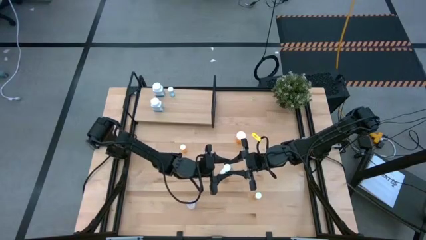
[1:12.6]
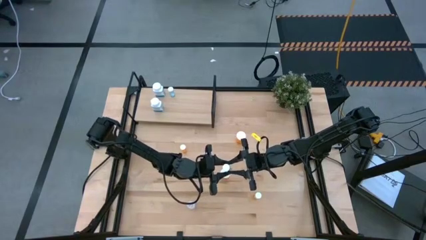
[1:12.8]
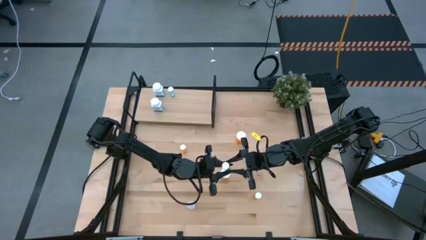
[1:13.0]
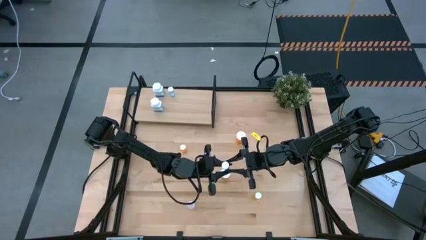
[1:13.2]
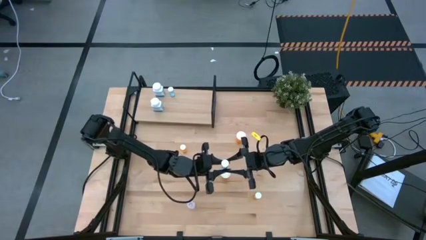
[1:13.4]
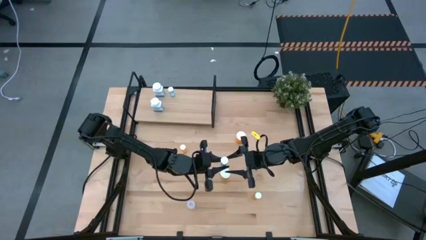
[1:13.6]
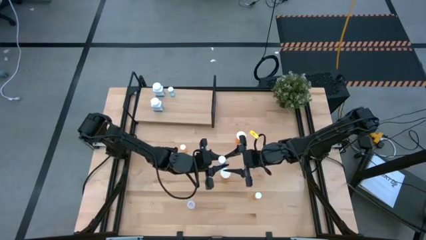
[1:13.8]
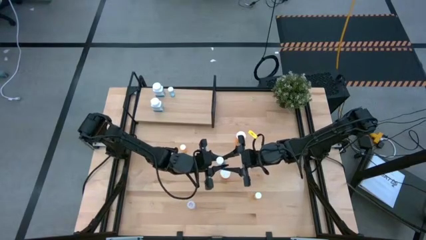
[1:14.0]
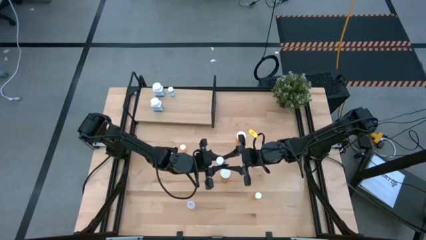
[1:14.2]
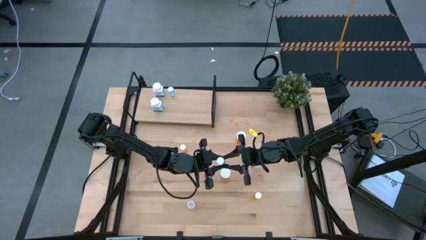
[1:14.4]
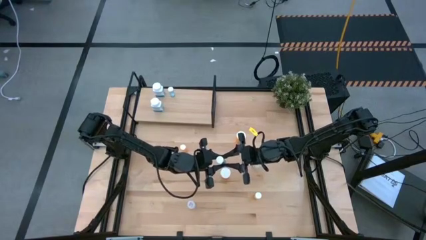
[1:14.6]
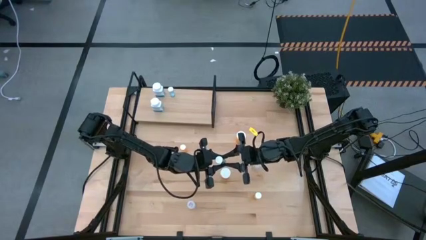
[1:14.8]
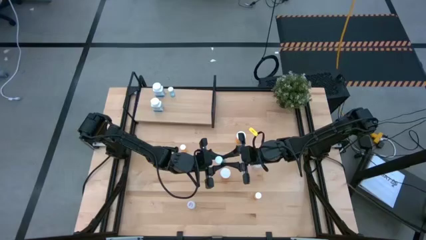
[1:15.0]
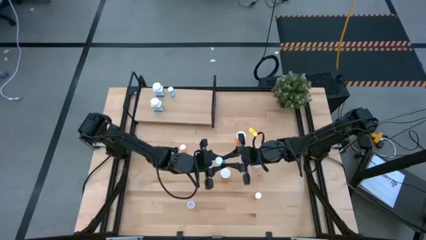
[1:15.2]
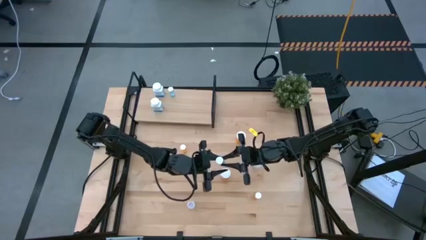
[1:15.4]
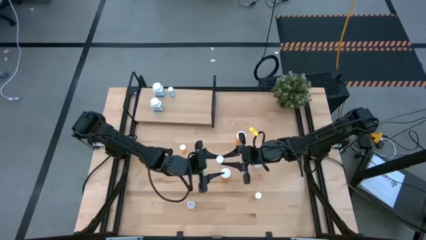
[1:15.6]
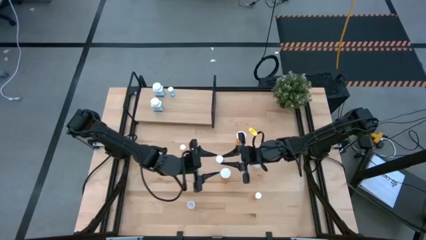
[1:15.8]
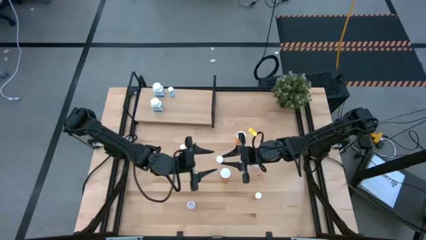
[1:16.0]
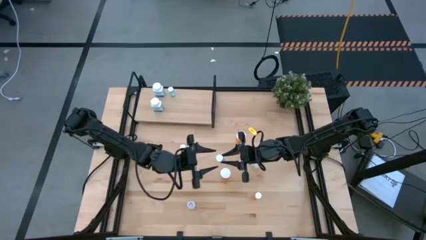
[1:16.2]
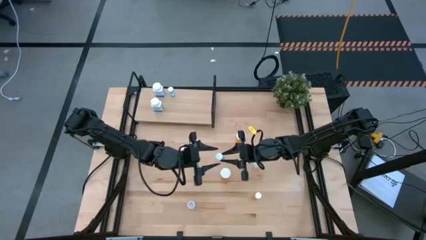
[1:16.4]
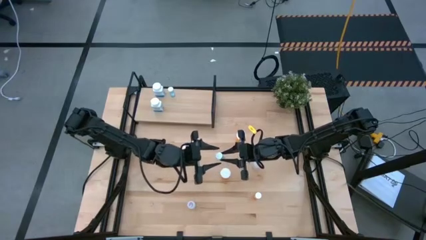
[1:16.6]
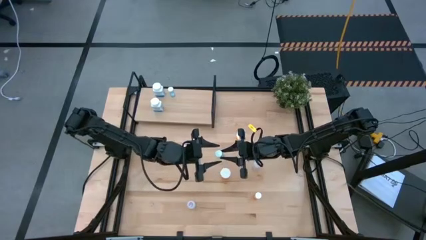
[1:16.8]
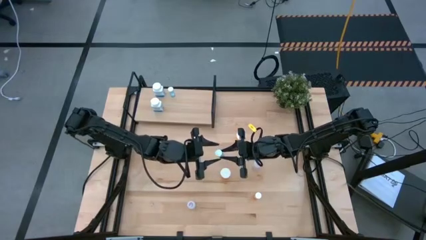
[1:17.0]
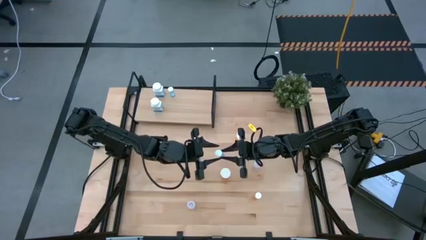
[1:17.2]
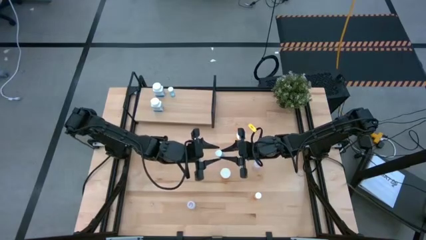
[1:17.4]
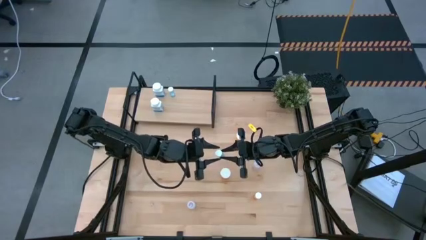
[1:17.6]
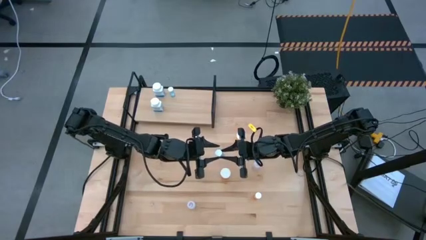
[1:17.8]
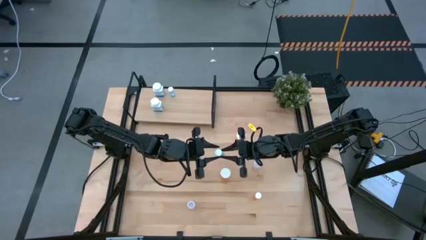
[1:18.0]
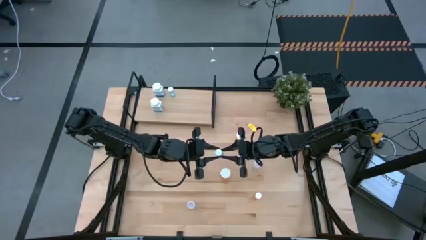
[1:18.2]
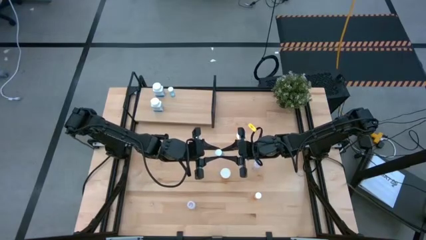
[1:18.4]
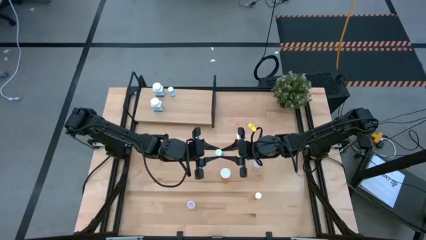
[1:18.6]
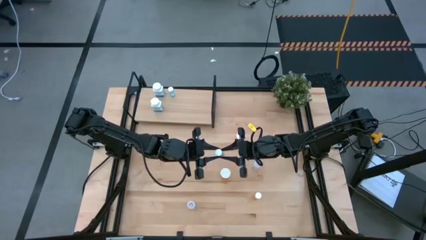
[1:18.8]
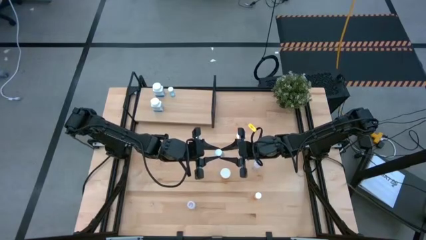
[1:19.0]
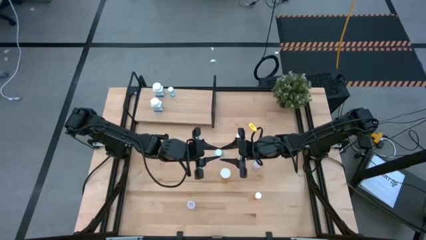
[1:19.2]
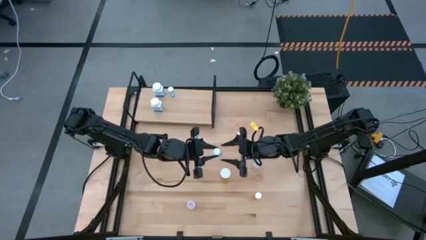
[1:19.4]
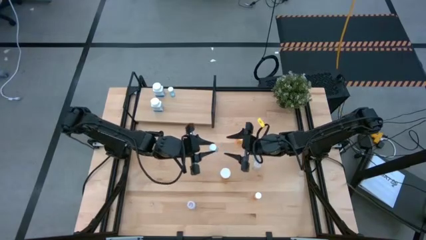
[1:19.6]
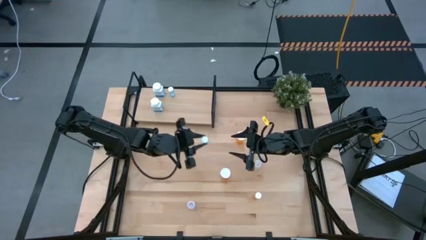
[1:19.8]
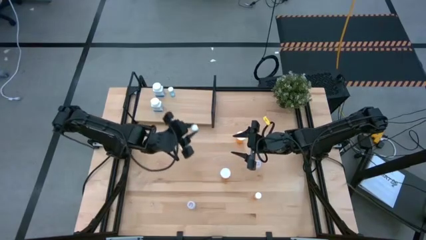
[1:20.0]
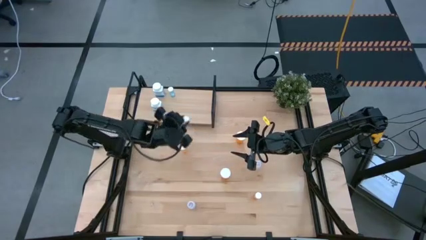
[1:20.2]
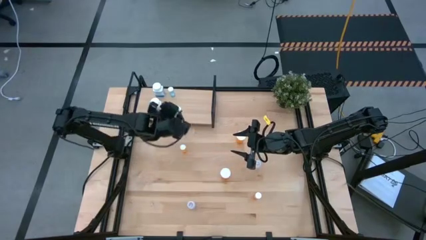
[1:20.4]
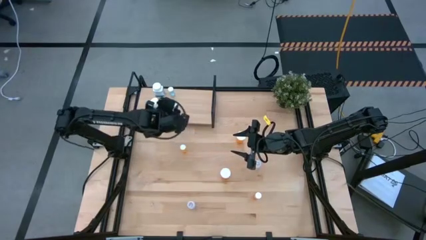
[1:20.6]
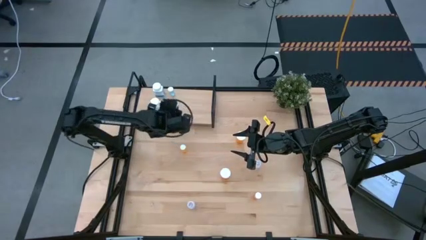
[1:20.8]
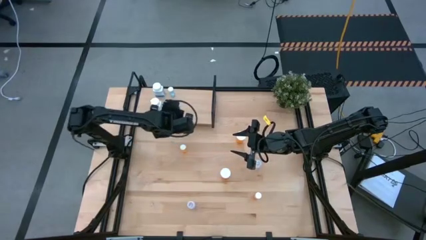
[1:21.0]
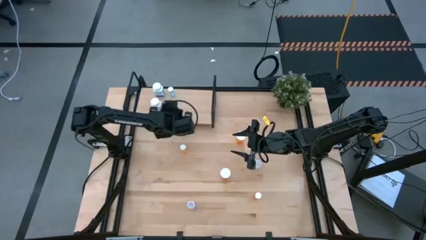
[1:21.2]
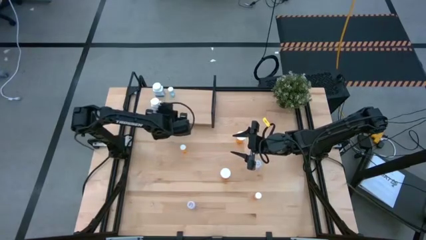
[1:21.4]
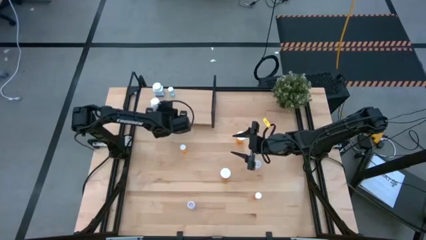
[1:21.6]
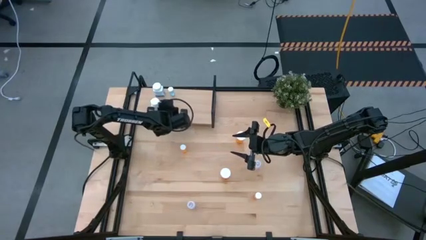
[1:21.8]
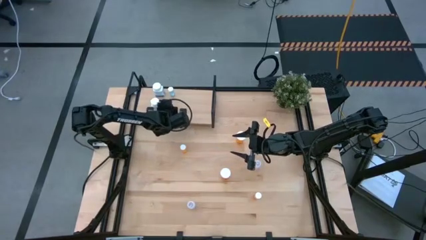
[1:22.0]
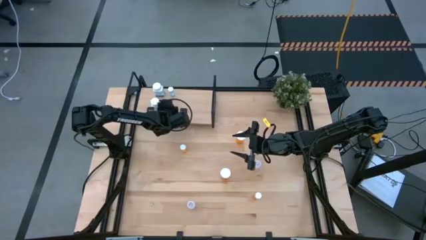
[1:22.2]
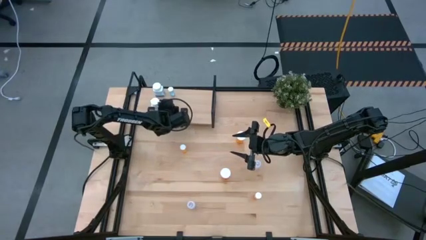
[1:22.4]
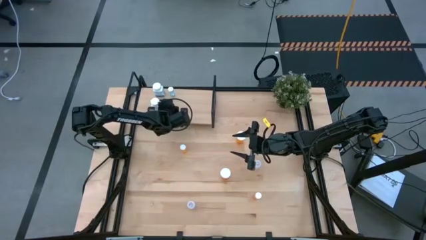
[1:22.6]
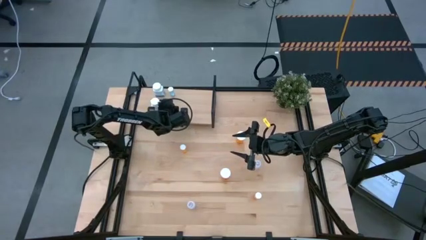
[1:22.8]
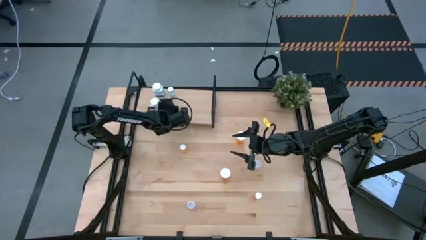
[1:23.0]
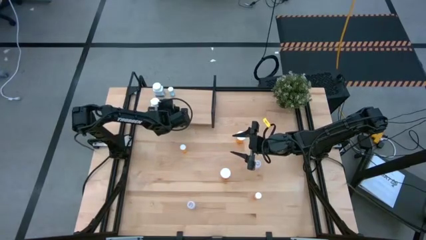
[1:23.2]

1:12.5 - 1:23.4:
Task: Pick and place medicine bottles onto shelf by color
Put the blue pill bottle aligned with the other blue pill bottle on the shelf

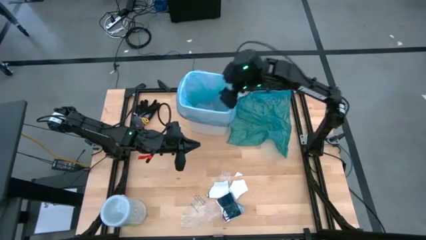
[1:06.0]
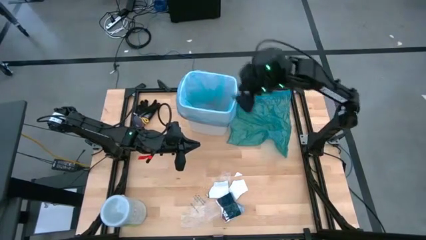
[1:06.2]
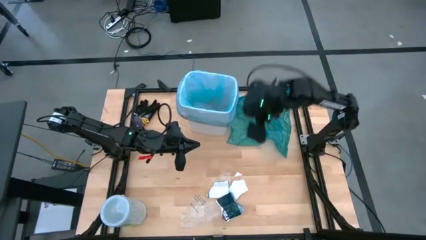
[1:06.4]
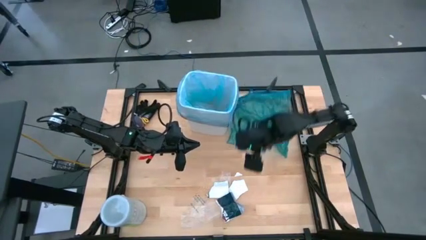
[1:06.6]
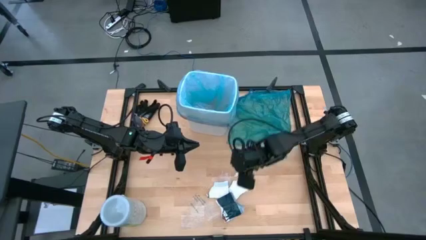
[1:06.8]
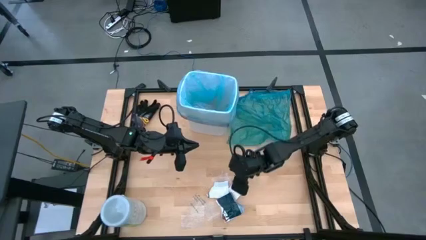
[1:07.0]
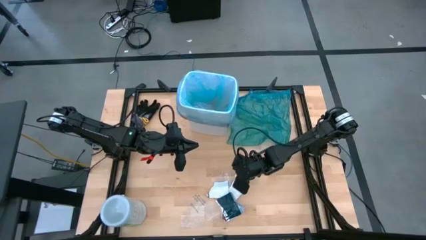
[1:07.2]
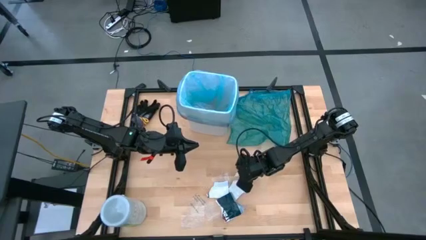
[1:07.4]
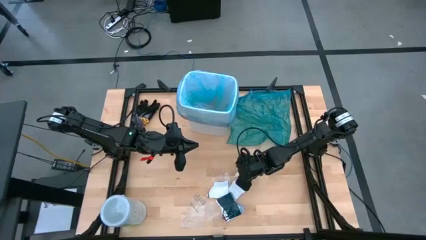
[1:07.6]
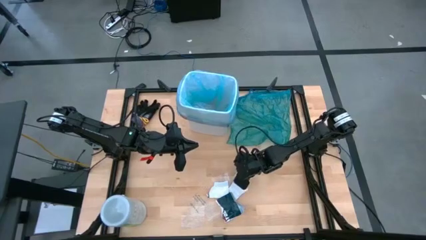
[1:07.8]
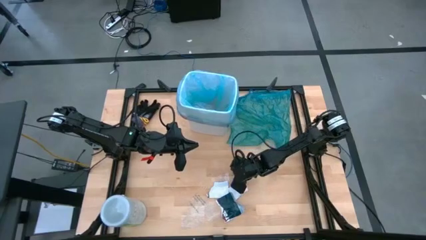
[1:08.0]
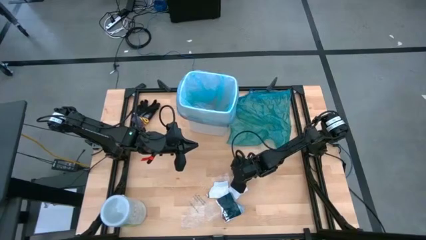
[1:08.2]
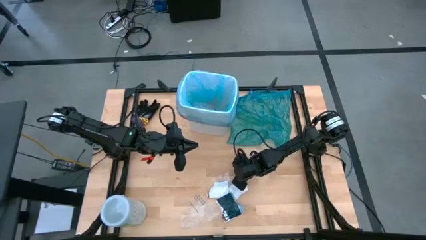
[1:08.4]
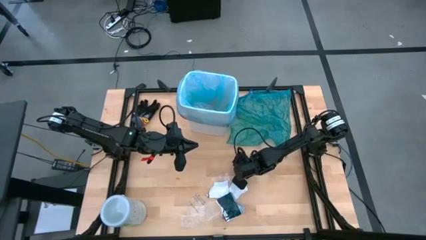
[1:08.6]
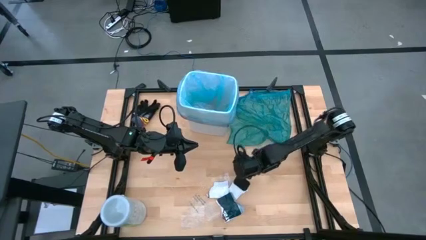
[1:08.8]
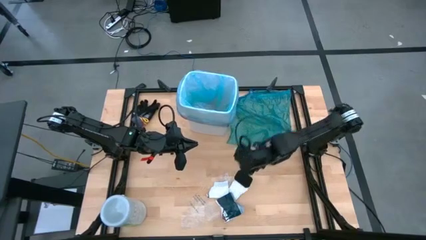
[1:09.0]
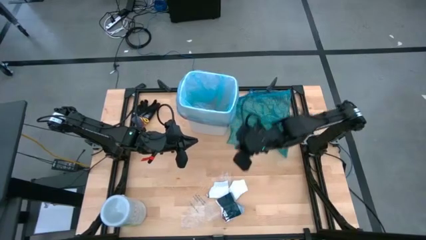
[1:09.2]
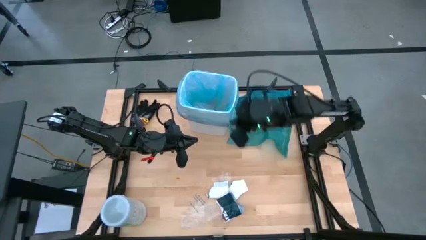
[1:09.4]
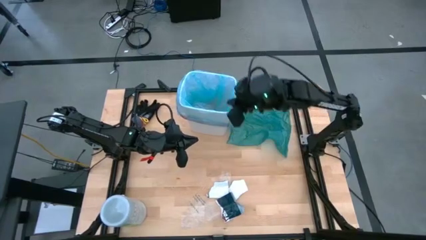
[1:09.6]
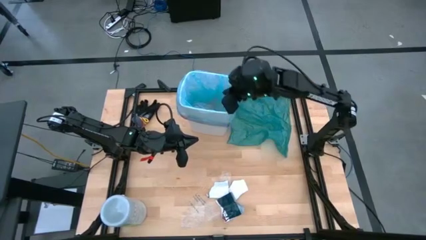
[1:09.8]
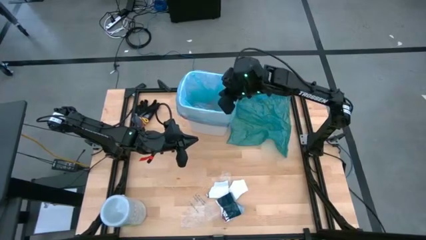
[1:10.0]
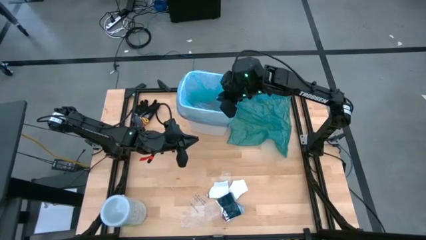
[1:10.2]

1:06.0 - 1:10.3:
Task: place trash/remove bag and relplace
Put the white paper into the trash bin
